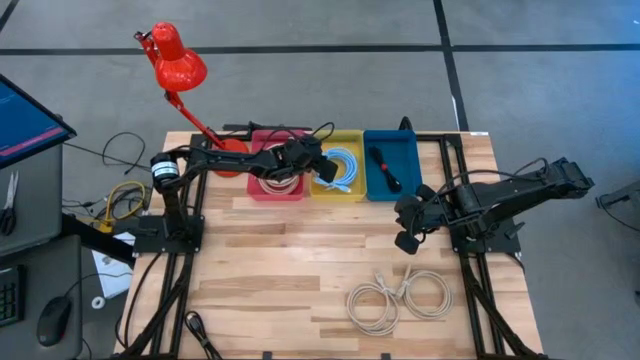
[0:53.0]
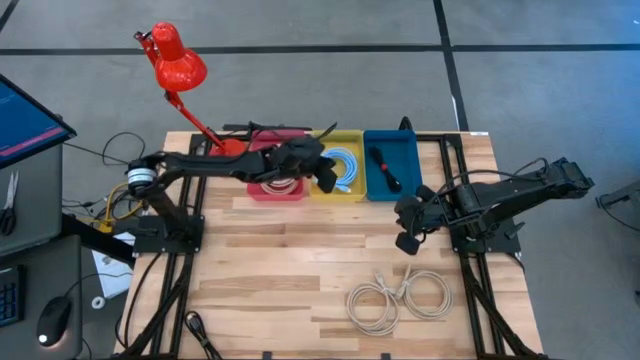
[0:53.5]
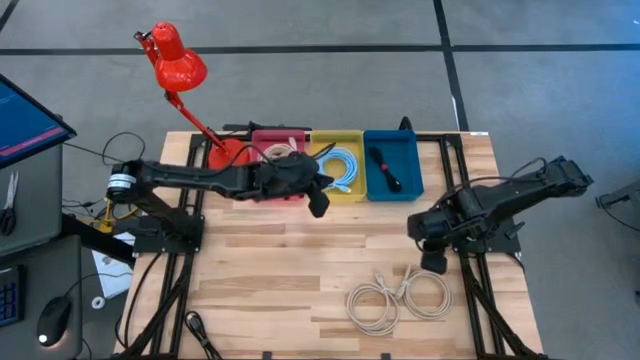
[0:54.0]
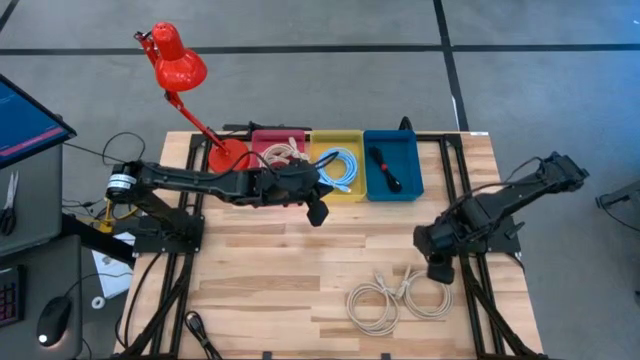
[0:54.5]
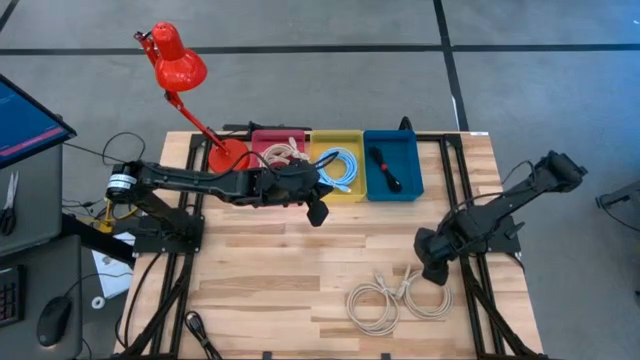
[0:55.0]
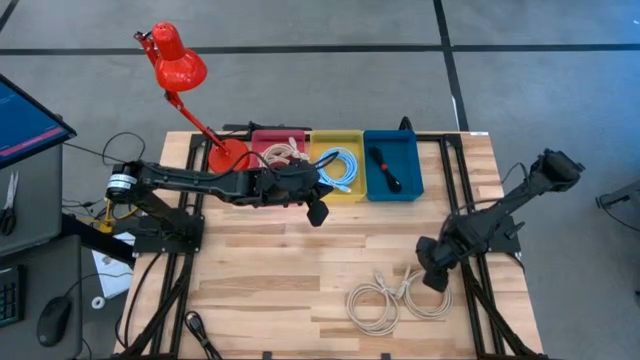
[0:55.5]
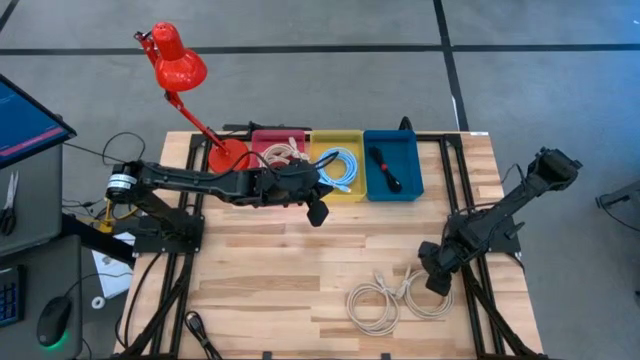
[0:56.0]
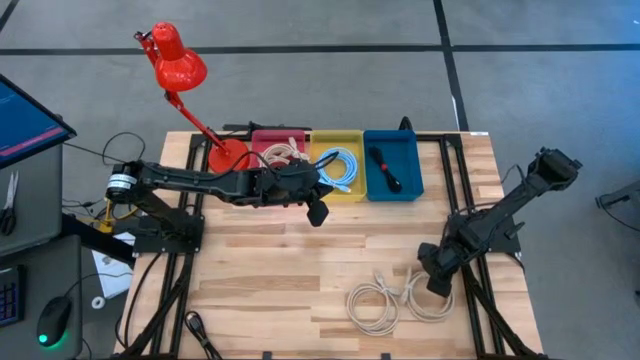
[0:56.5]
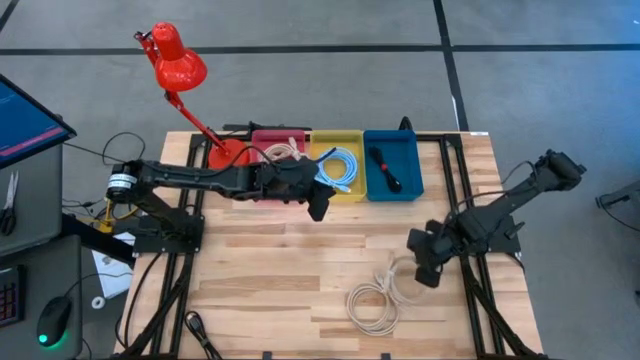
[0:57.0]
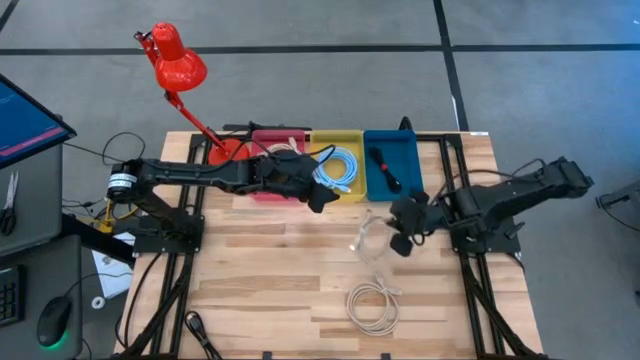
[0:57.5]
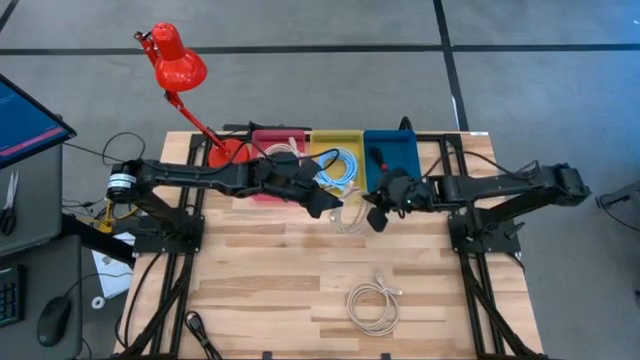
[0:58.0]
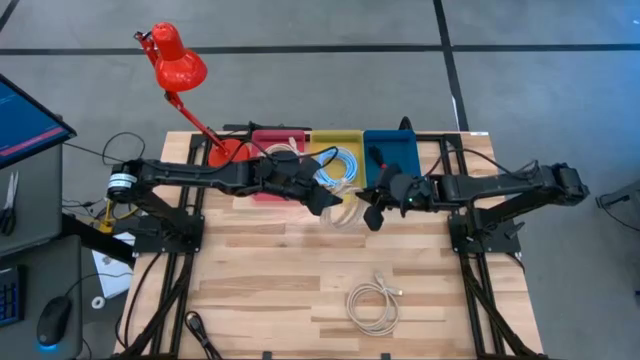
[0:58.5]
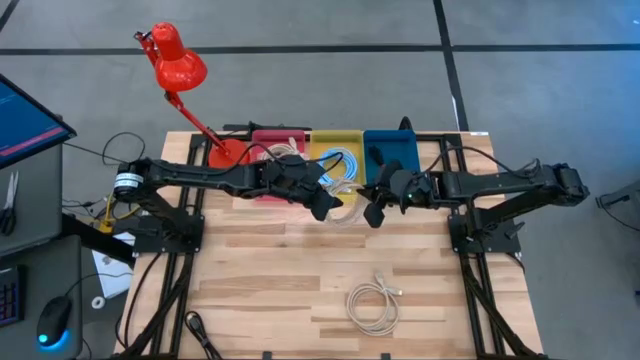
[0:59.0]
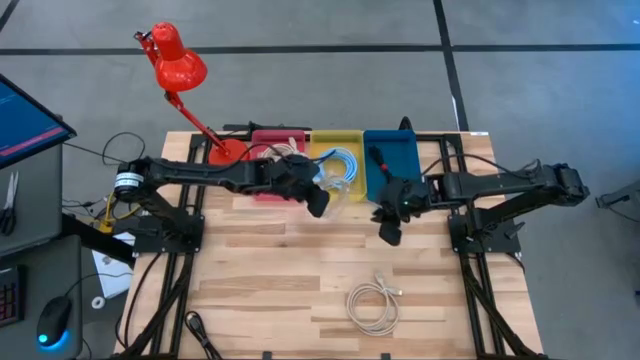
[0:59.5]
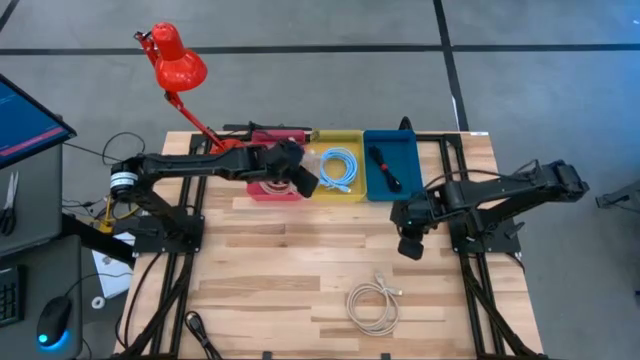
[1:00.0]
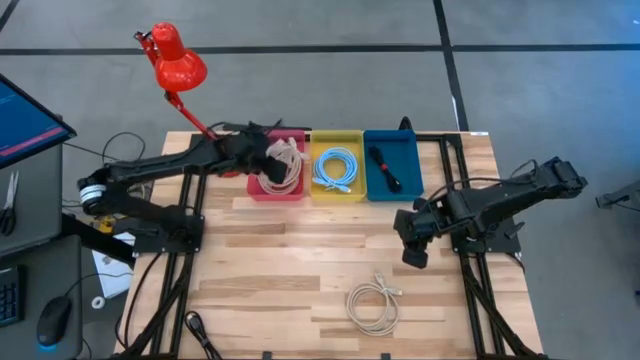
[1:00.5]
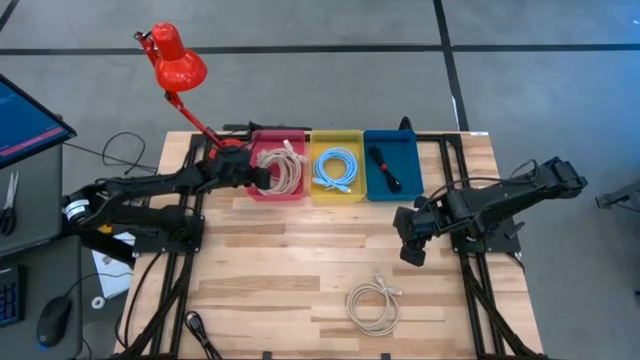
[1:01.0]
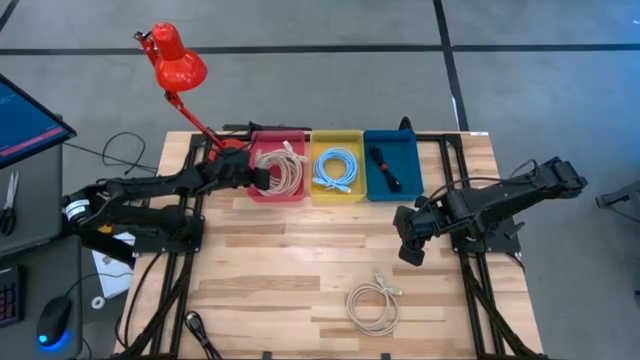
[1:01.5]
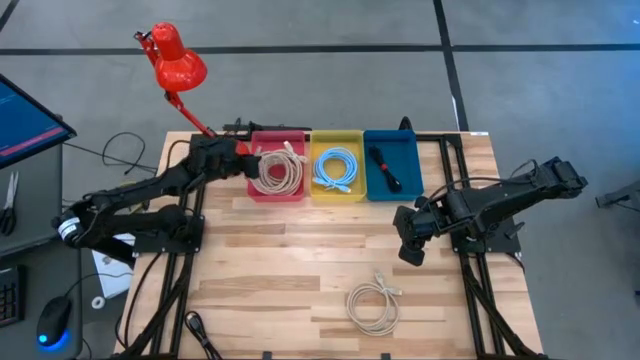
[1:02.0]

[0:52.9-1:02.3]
Task: Pick & Place USB Port
Put the right brown charger cable into the red bin

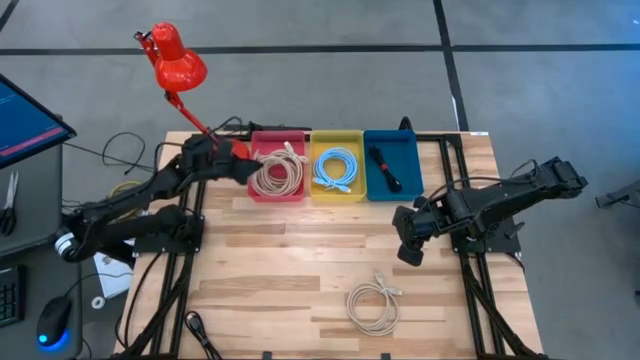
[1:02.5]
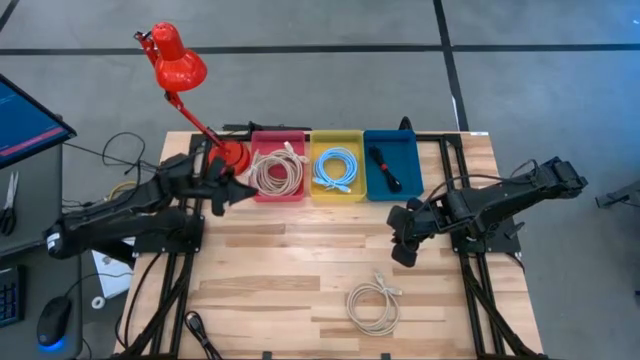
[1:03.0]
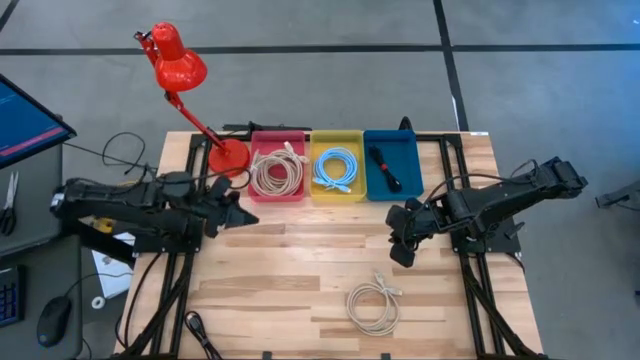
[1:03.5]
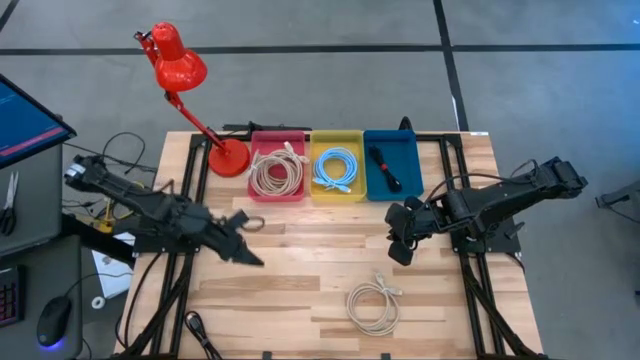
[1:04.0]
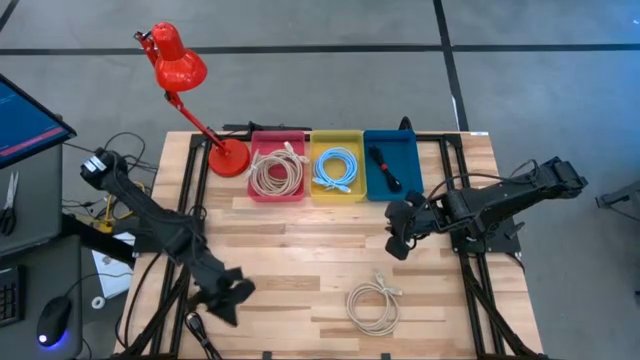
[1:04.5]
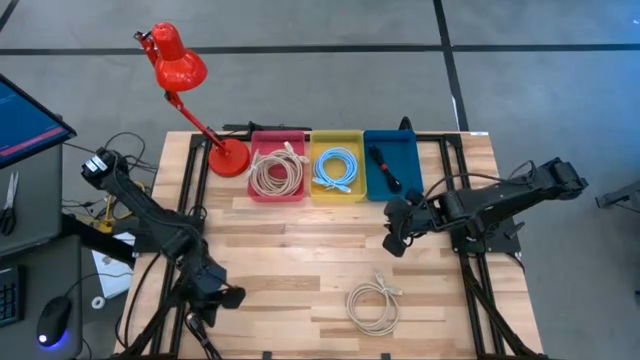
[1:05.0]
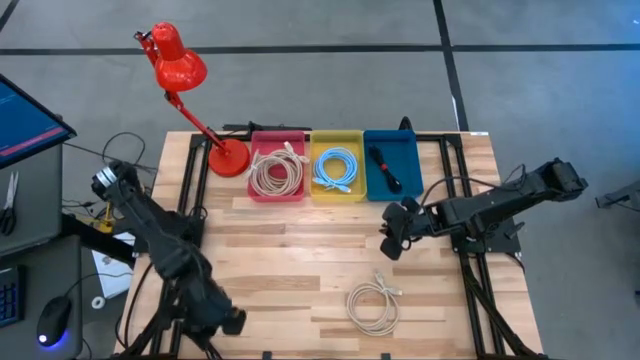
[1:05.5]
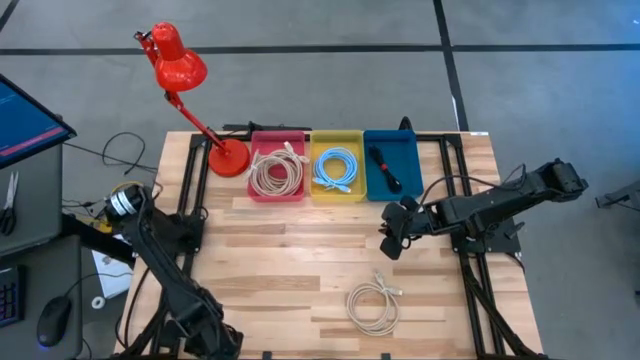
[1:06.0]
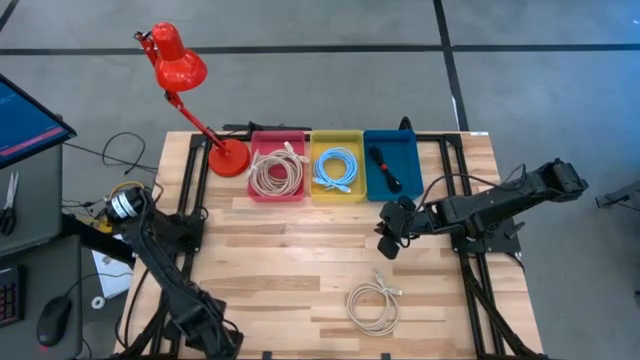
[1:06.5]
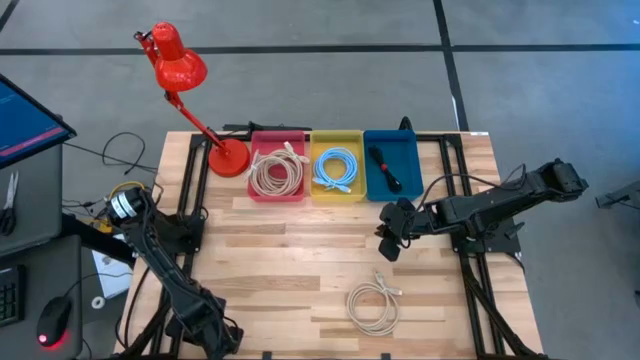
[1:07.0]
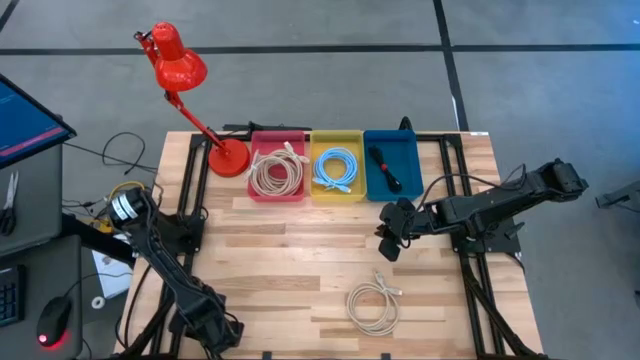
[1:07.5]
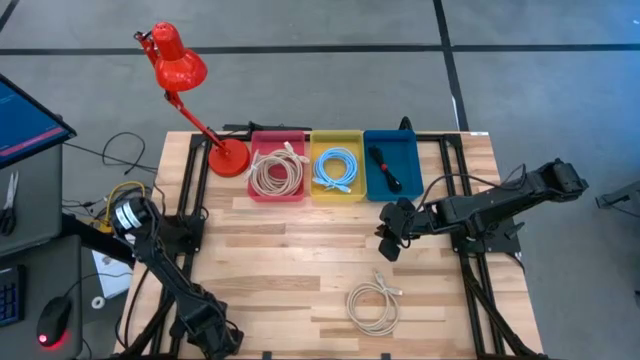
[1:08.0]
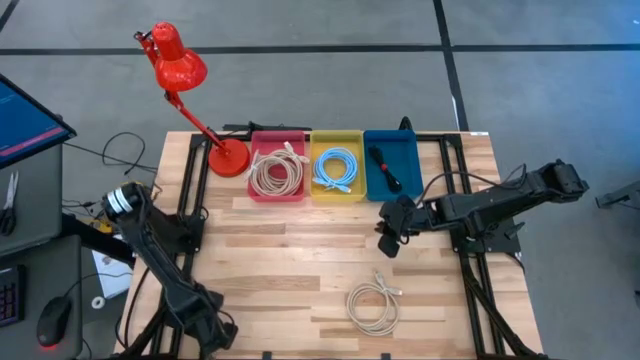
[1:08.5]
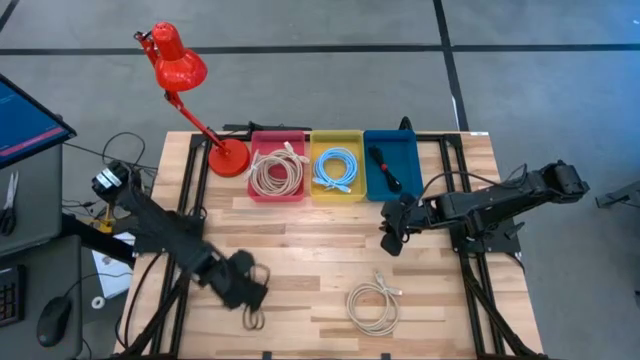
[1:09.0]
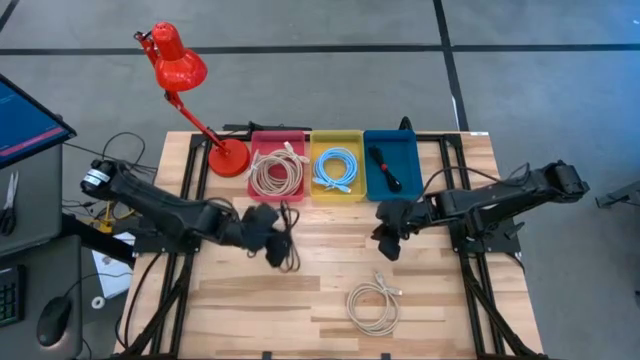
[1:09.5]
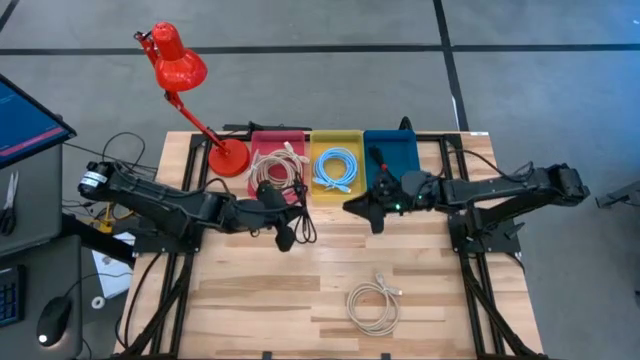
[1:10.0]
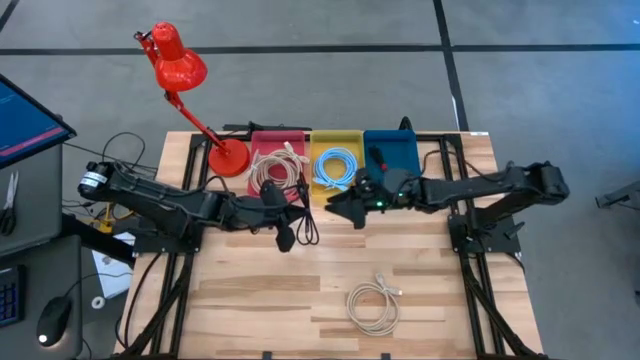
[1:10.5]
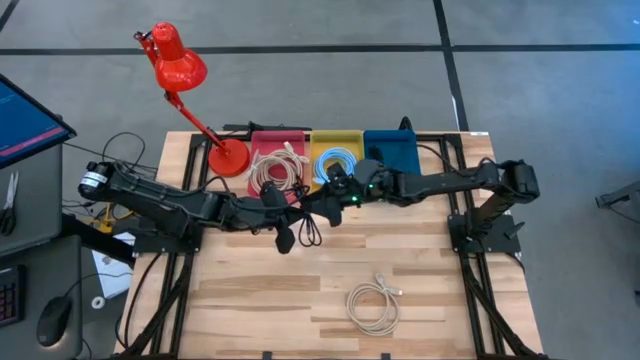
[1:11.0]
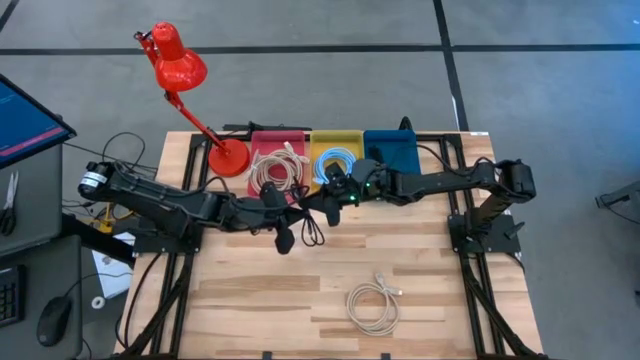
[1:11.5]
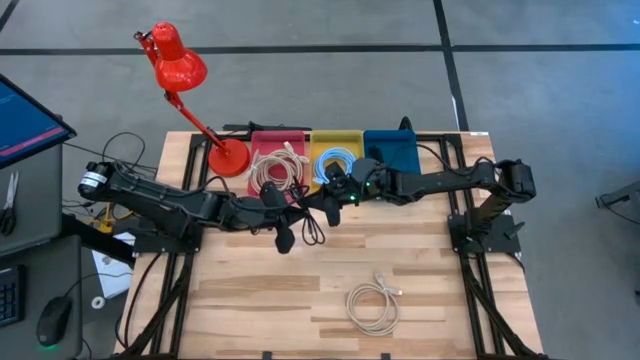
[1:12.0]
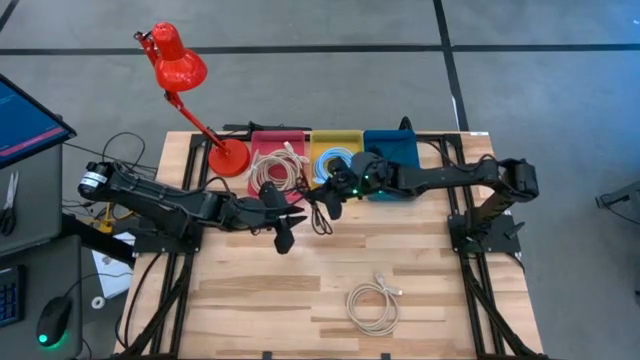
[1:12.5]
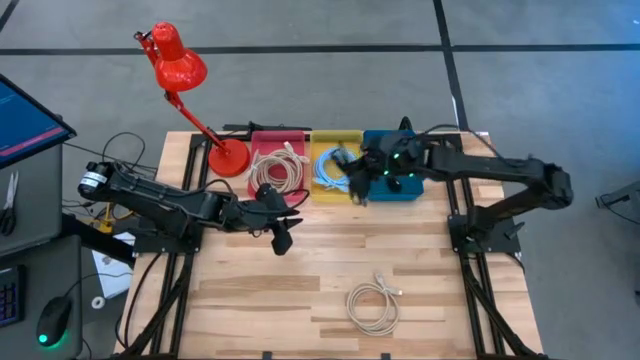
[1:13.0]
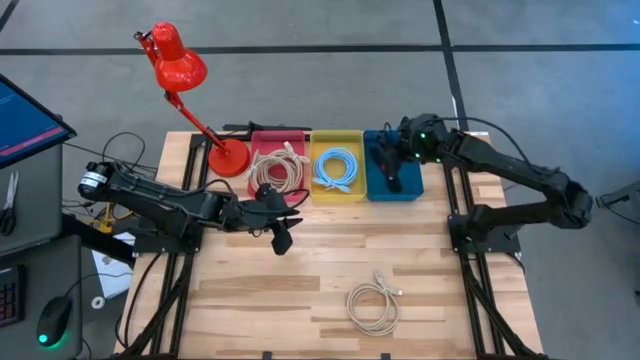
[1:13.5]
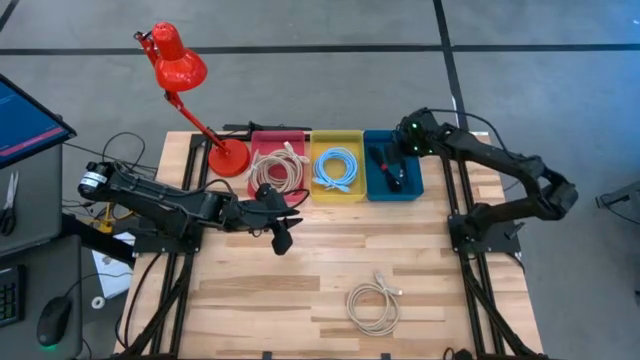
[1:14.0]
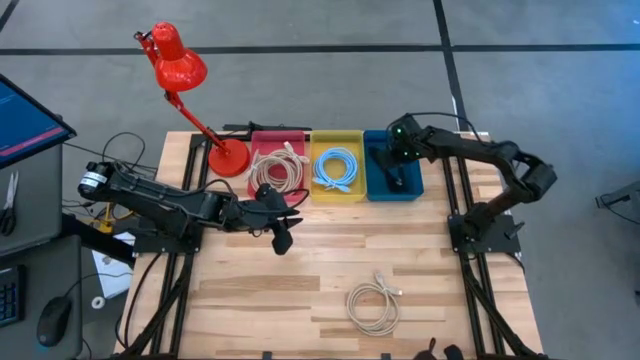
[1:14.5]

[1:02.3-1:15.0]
Put the bottom left black charger cable into the blue bin
